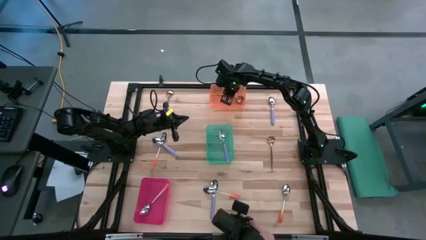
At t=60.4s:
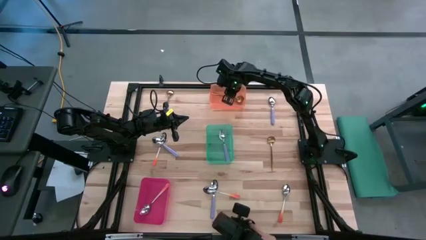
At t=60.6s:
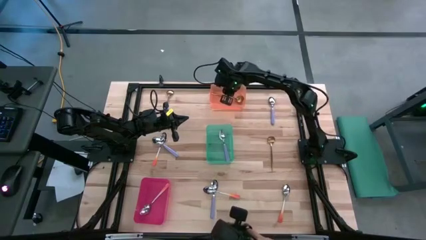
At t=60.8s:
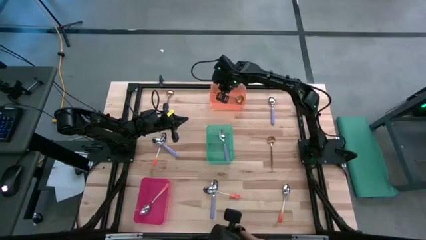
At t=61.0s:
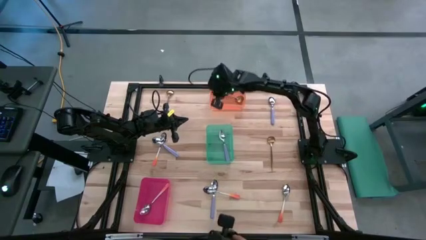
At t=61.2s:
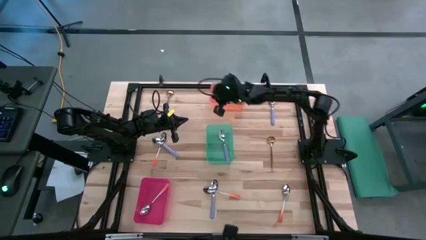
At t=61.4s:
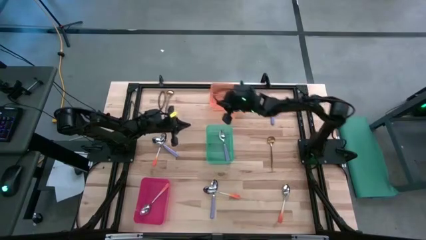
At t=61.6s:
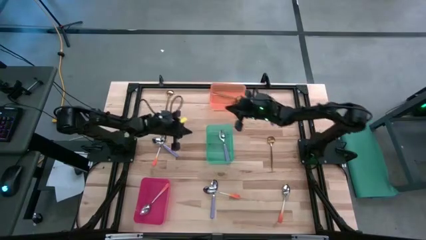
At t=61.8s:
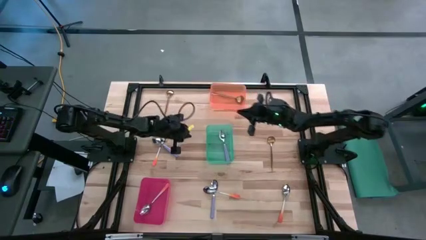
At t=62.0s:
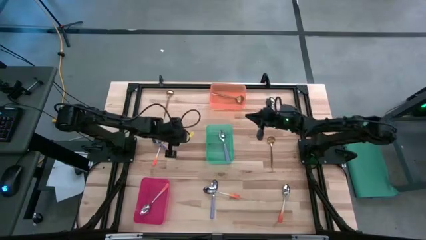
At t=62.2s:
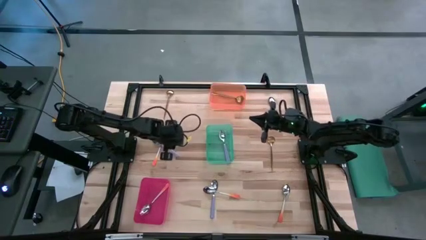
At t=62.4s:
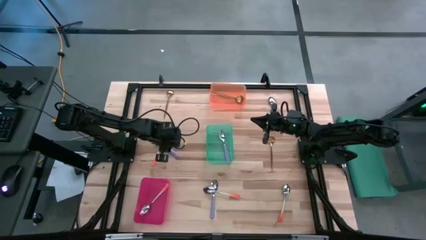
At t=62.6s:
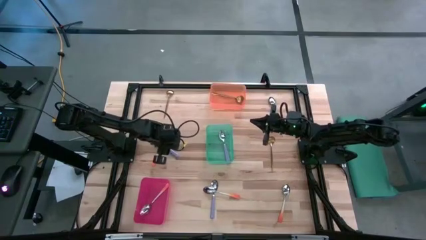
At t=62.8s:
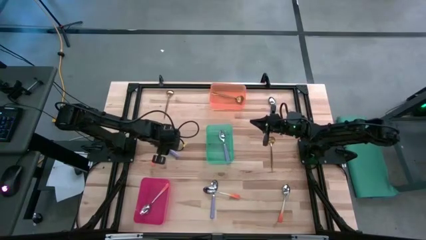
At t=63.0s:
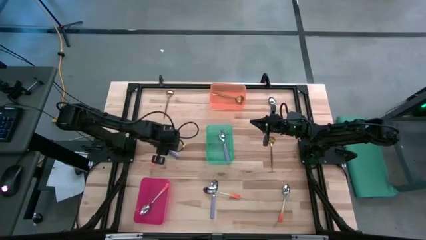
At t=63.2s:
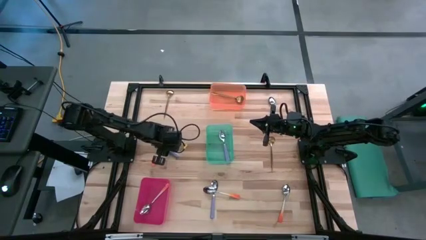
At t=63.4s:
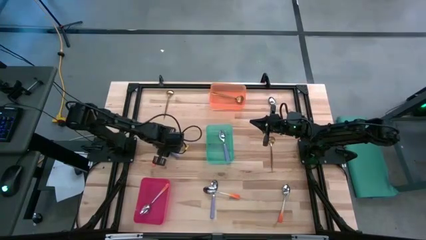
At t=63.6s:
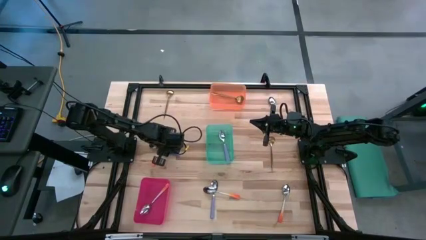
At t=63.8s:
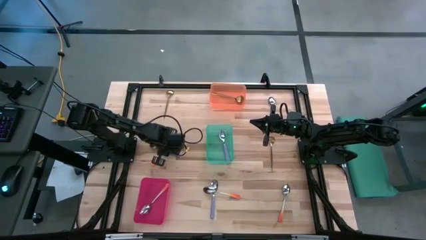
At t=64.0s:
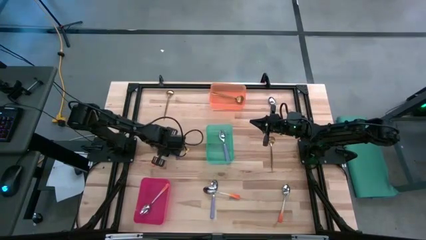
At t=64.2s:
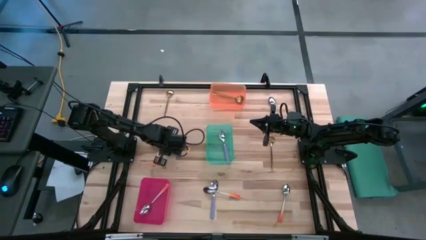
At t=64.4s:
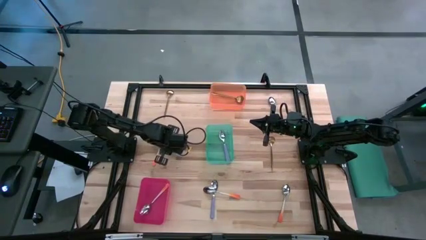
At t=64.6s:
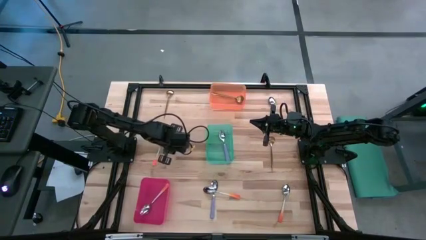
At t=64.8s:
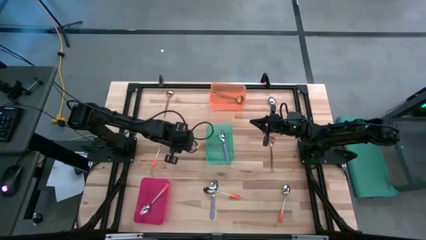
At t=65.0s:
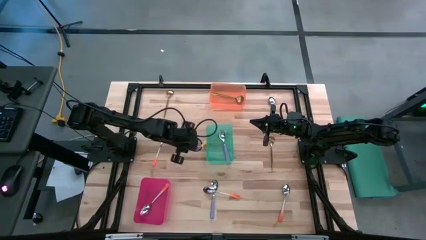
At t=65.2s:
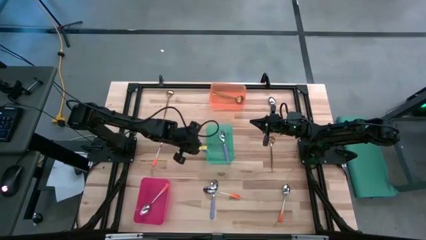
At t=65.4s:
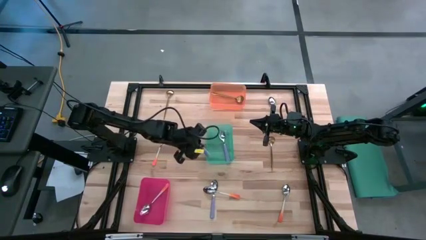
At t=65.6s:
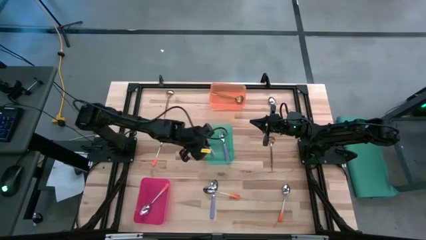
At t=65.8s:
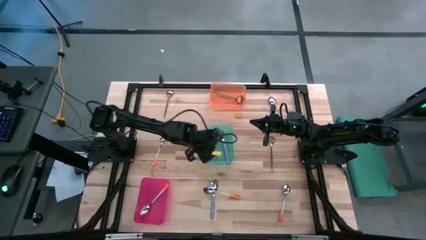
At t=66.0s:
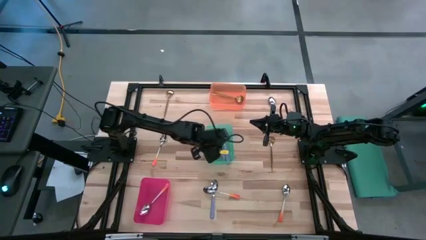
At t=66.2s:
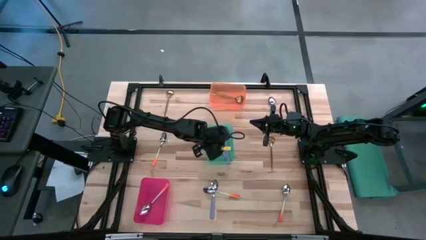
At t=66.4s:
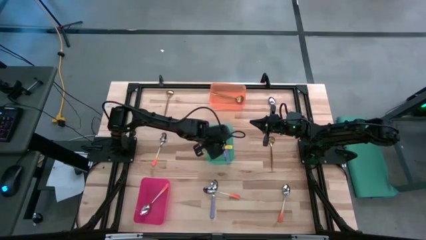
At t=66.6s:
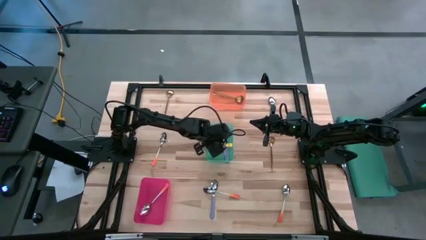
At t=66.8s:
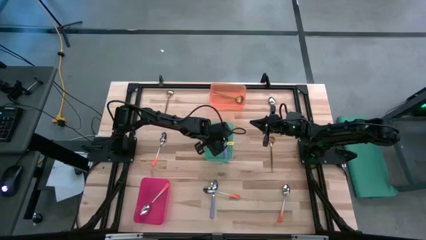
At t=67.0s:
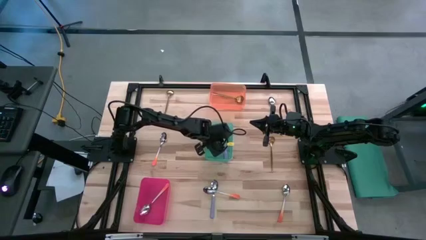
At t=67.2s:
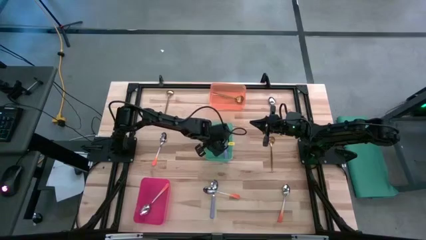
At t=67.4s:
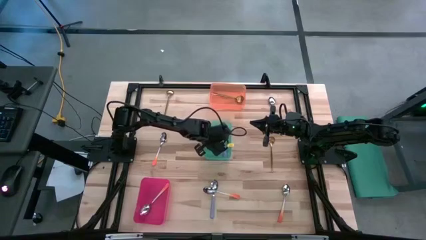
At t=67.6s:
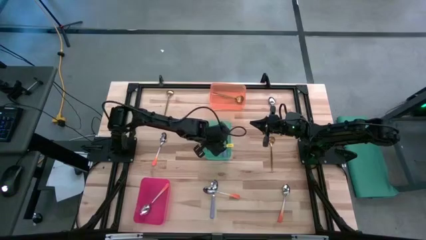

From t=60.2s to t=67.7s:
Task: Sort silverware by color (type)
Put the purple spoon into the green bin

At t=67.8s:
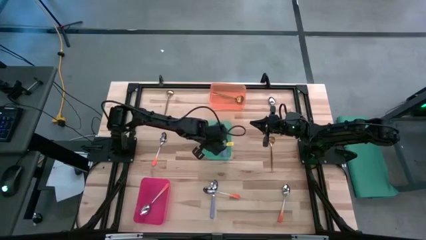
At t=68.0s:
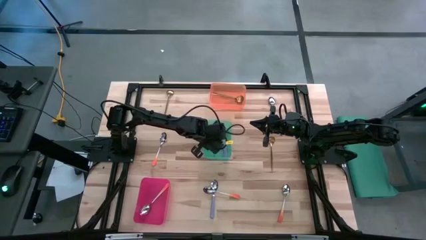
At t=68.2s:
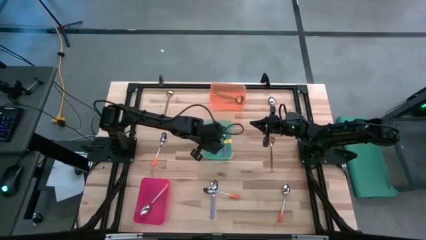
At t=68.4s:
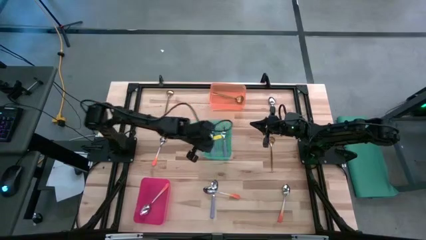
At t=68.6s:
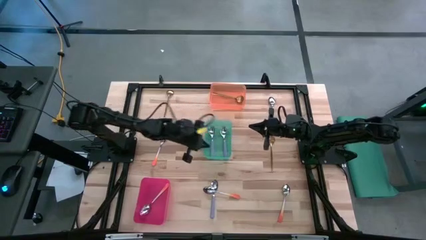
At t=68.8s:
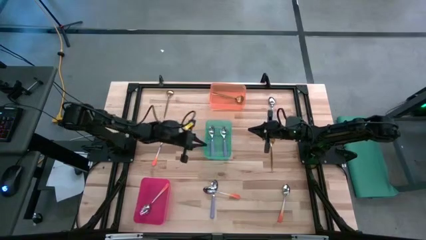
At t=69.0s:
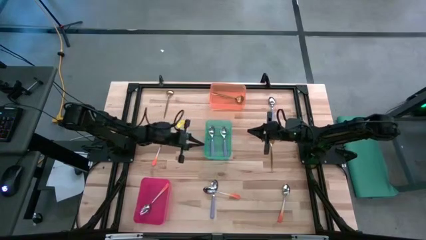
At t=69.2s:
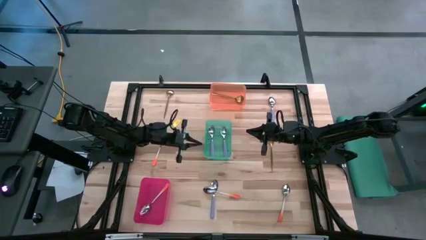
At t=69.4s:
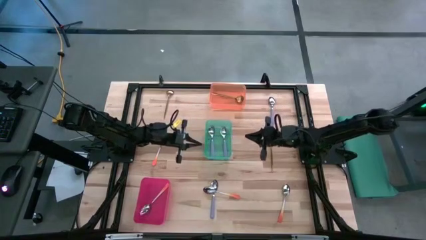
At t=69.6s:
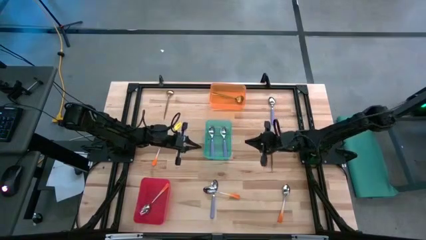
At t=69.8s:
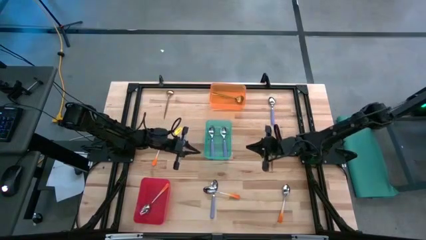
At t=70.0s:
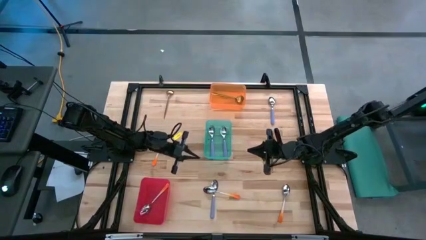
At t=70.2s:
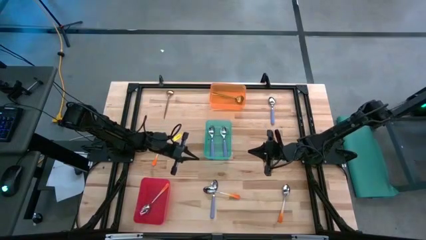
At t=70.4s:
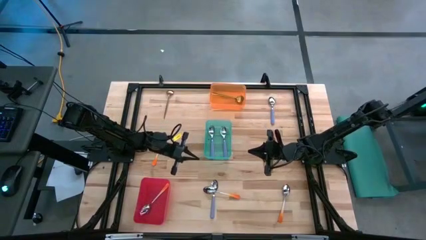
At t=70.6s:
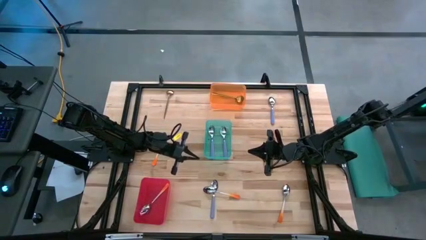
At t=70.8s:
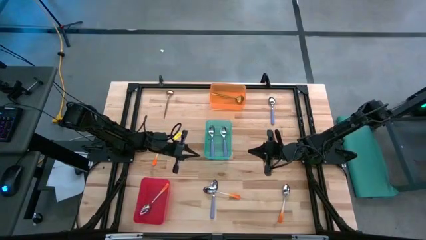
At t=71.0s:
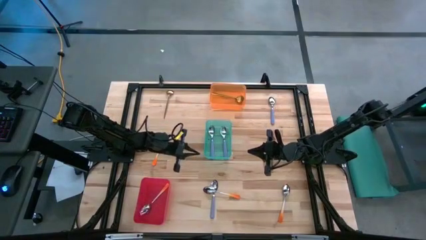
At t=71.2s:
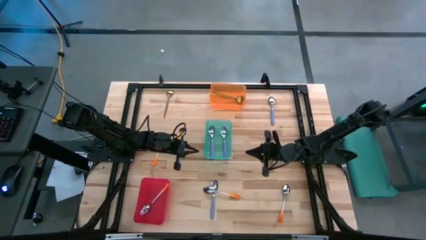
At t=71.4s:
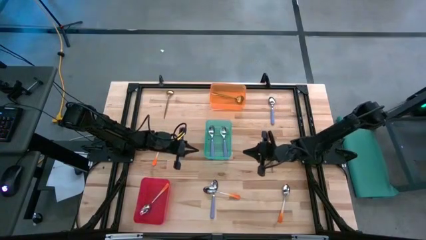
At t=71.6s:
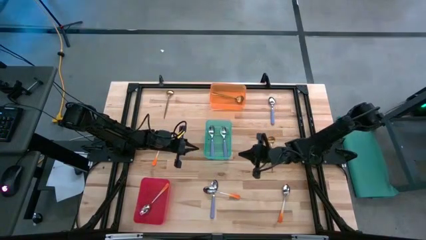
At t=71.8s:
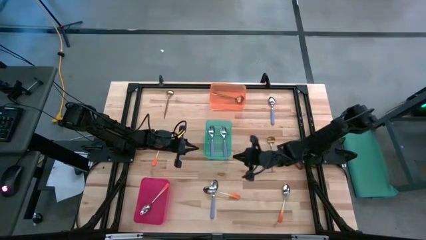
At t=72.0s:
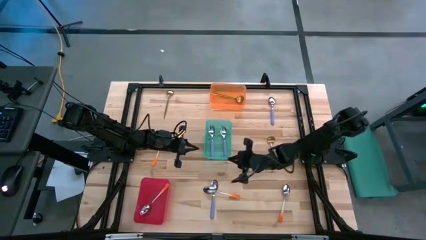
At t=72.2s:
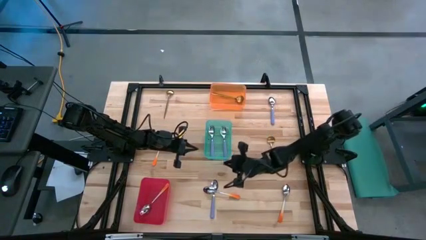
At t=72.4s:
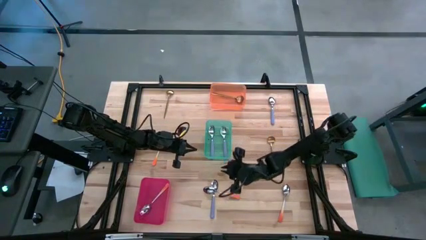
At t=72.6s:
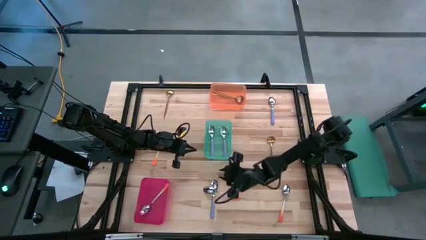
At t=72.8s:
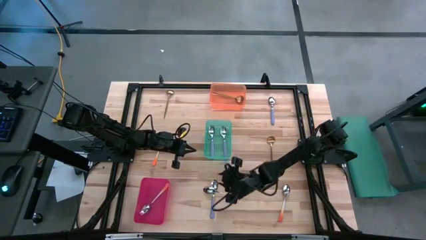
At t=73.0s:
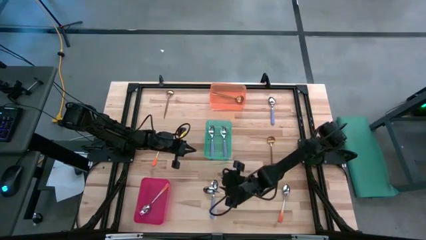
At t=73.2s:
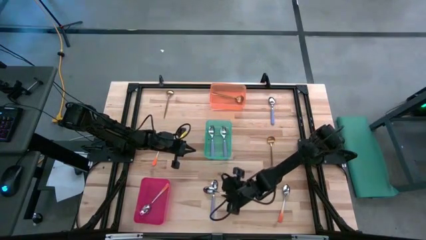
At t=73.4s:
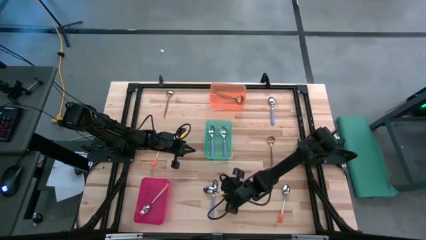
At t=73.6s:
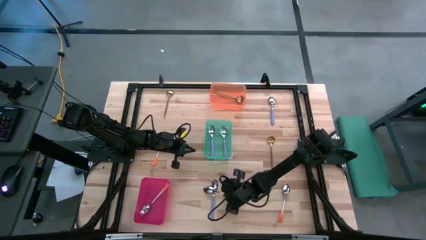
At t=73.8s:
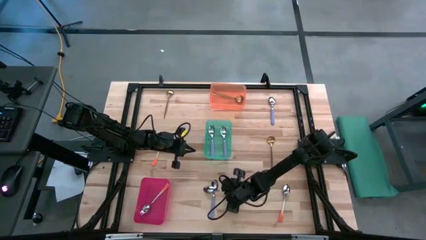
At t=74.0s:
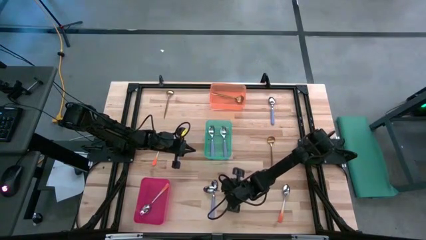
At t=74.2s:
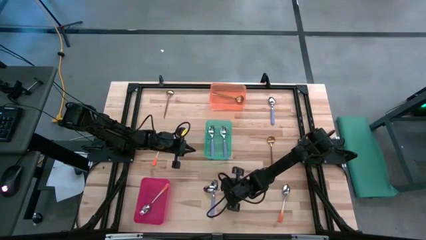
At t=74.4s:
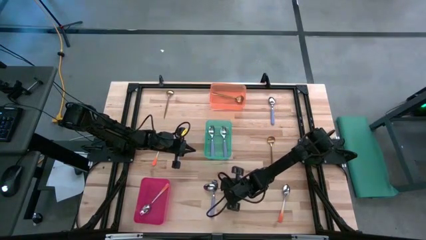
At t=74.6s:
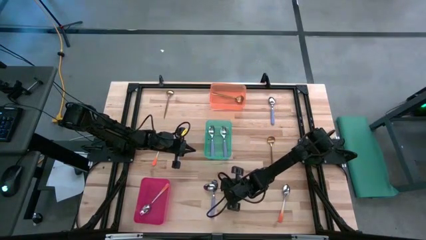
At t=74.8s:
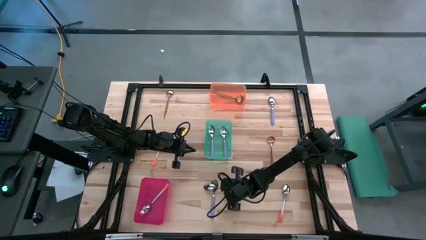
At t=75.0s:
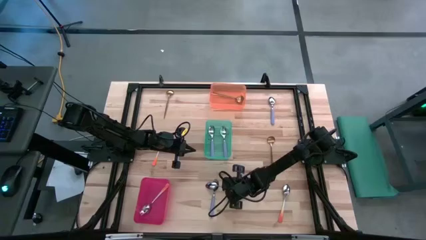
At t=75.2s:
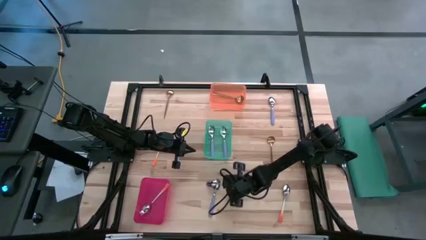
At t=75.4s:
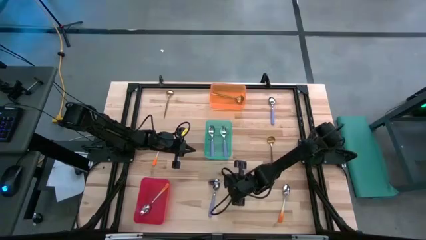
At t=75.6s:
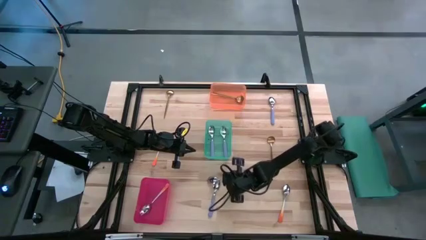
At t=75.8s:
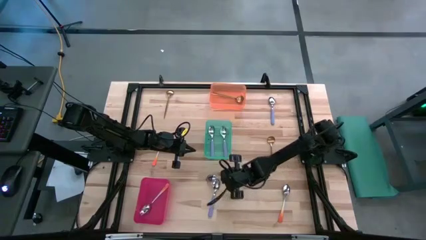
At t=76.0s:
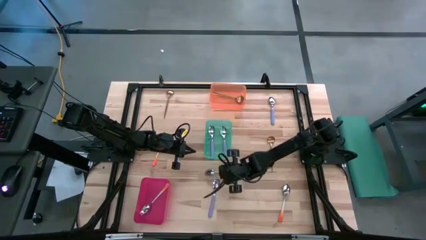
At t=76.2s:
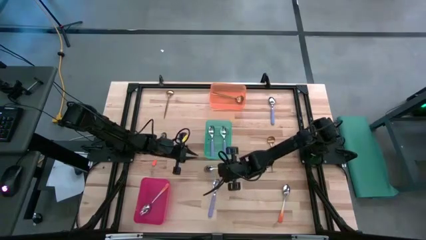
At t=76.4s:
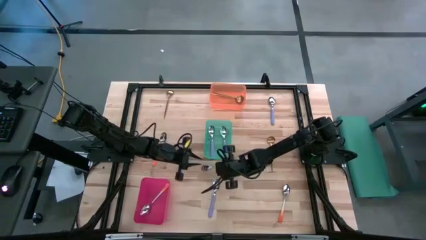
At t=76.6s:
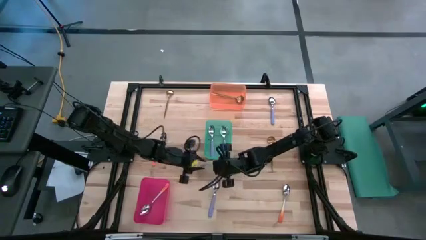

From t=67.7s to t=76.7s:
Put the orange spoon into the red bin
